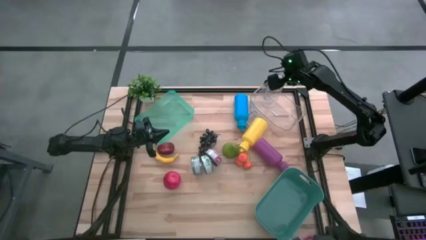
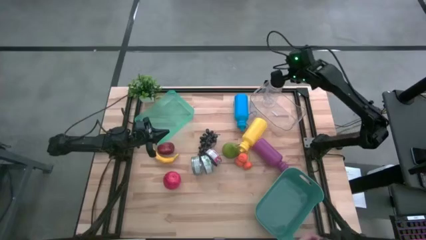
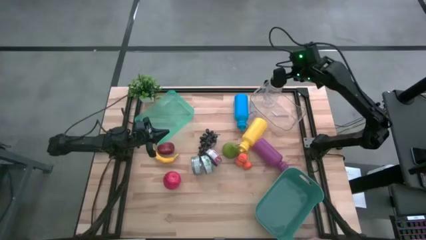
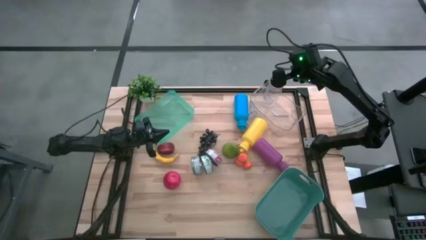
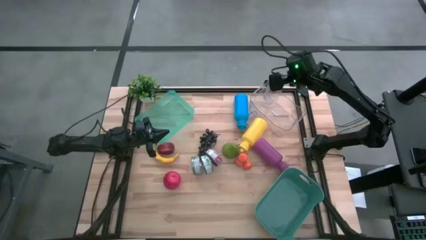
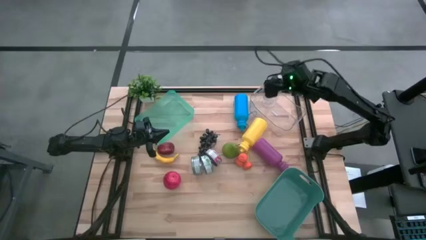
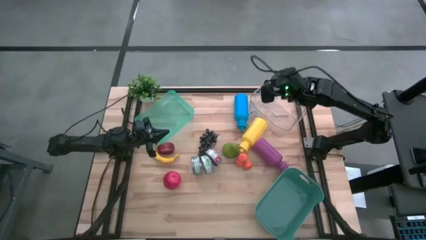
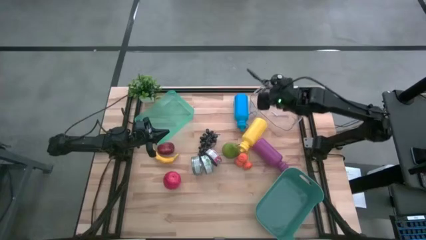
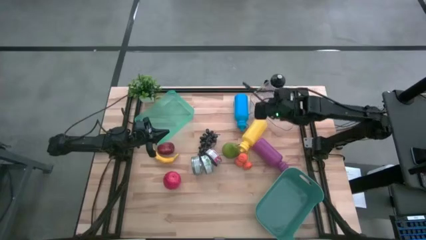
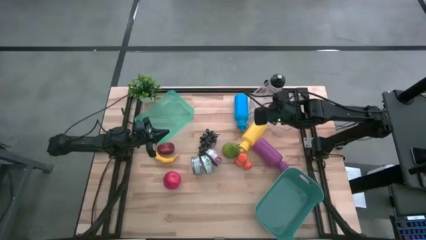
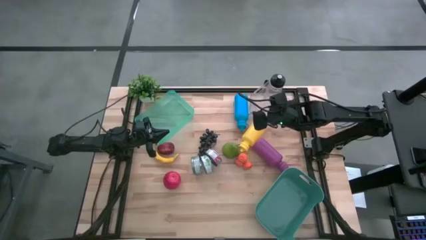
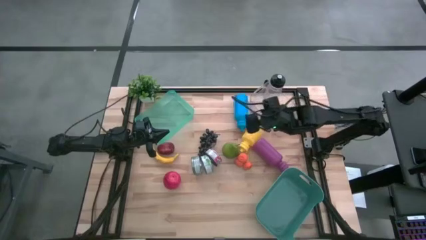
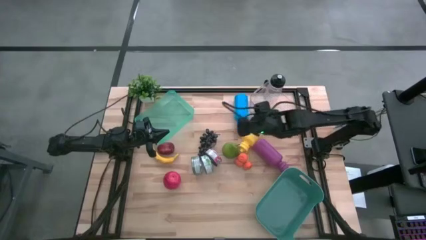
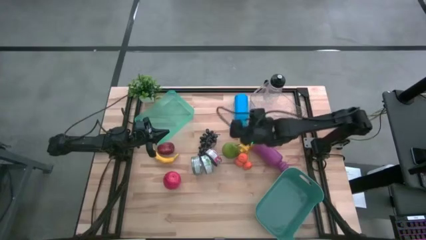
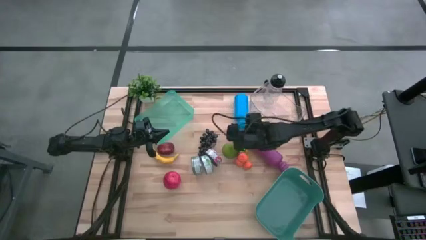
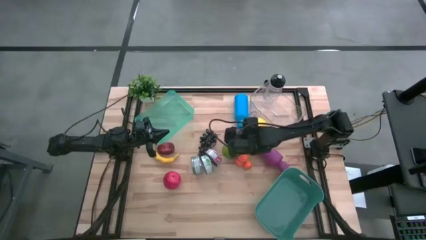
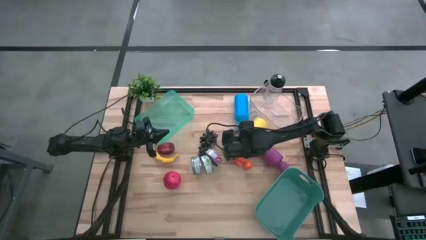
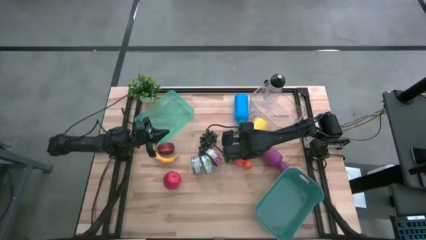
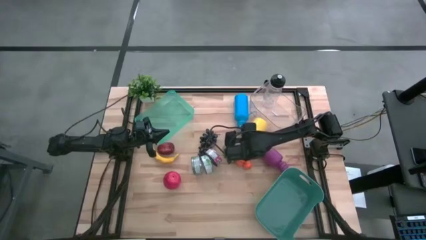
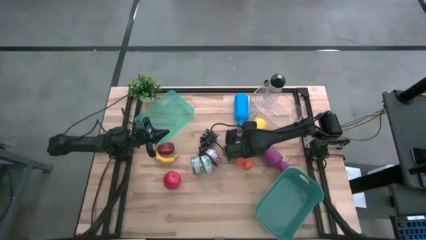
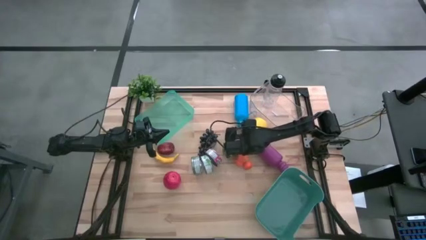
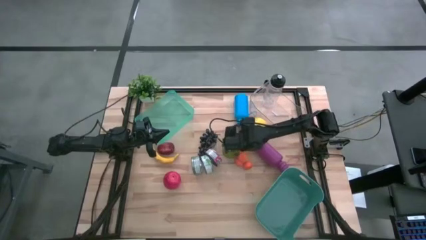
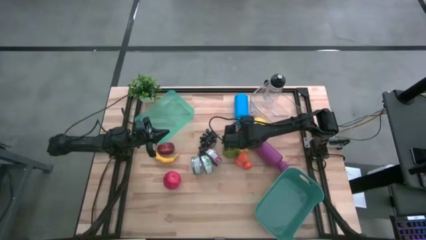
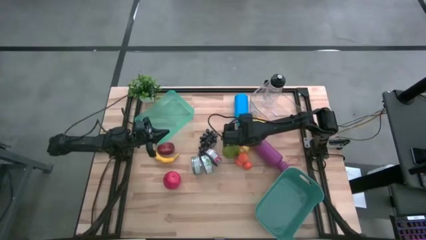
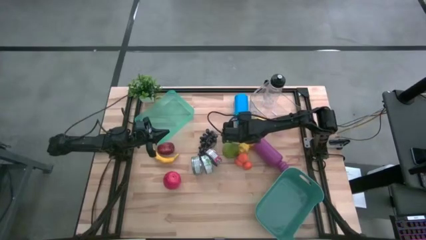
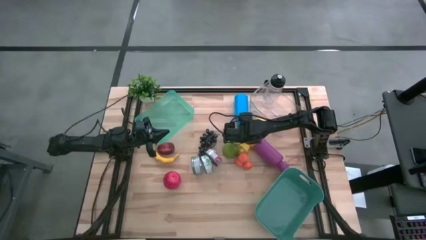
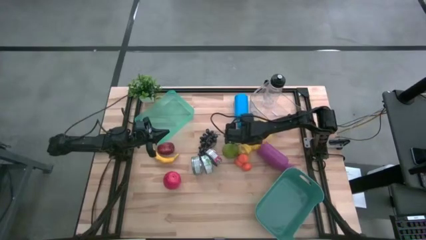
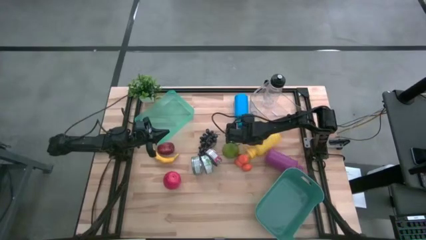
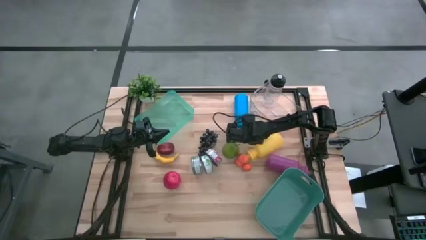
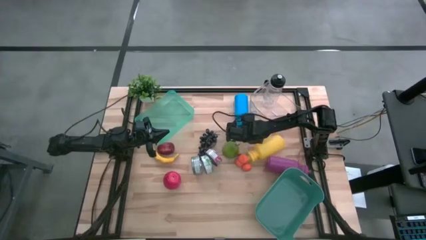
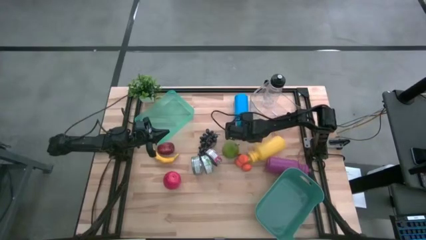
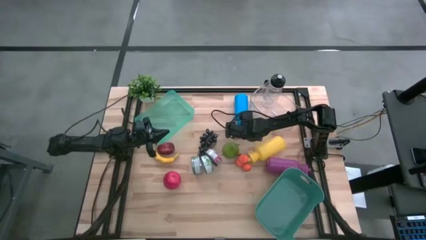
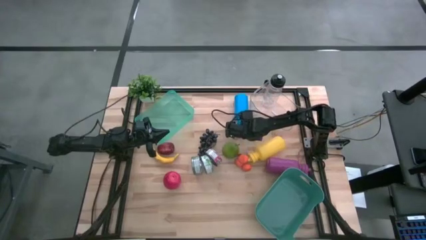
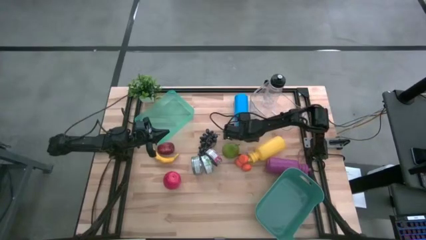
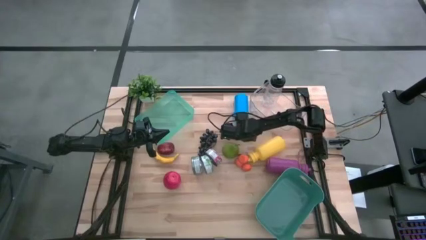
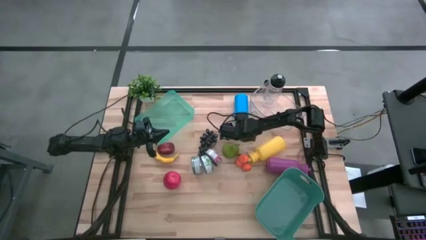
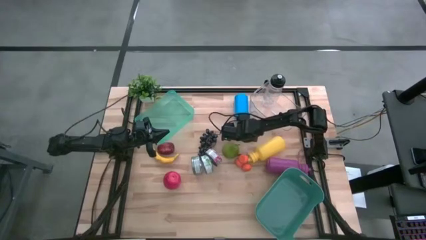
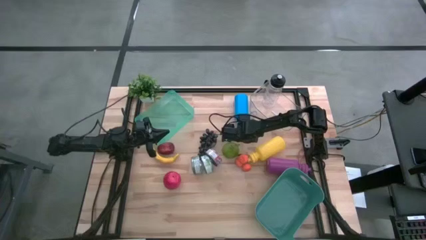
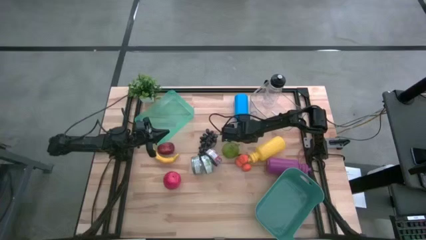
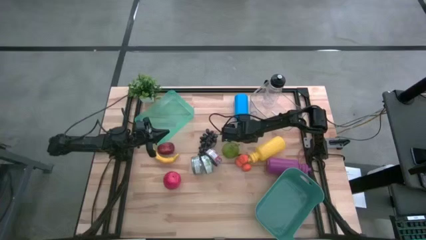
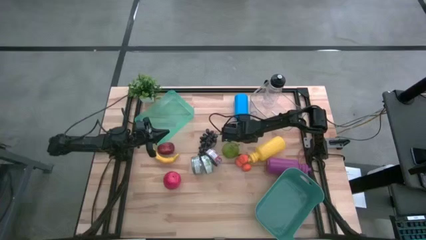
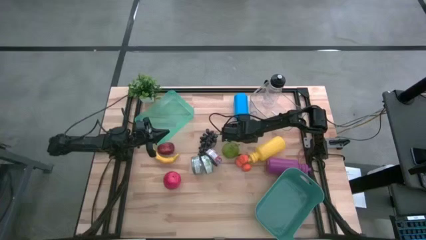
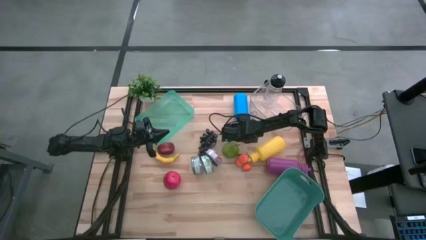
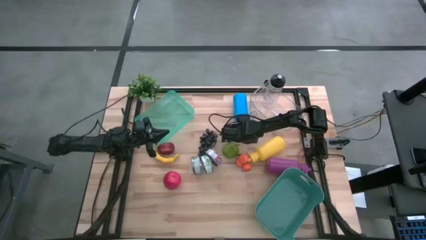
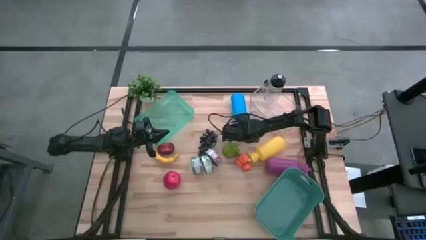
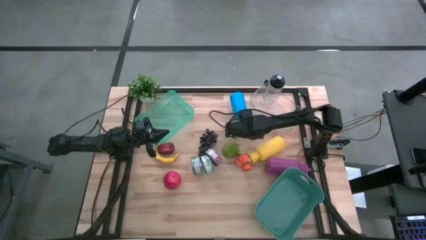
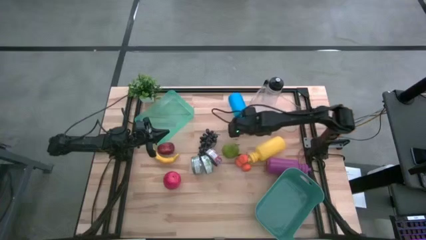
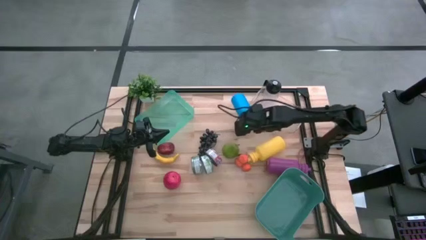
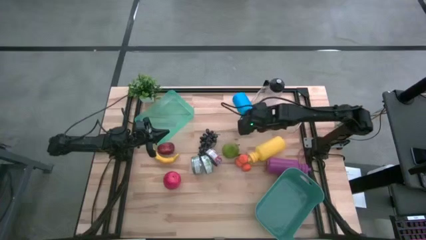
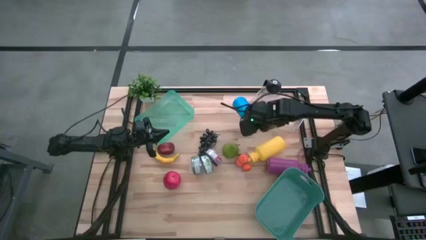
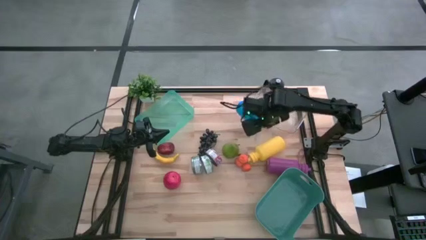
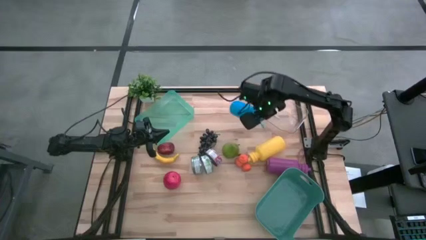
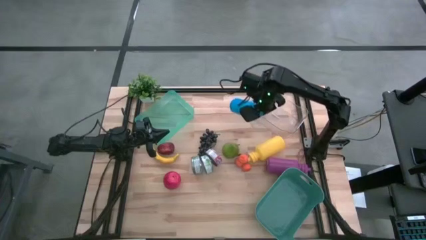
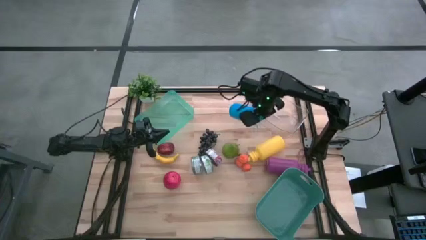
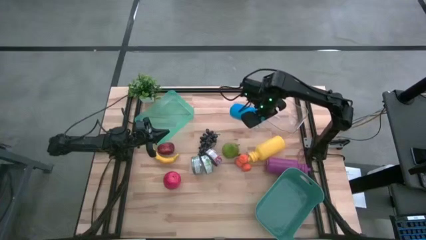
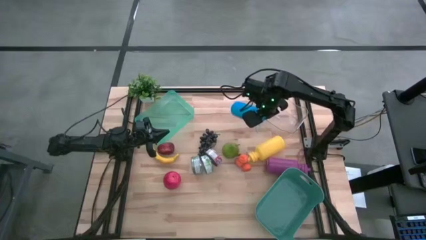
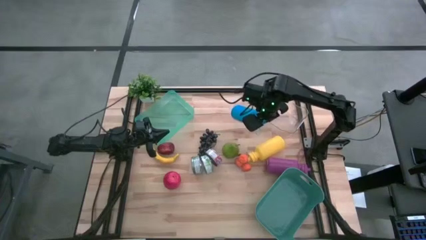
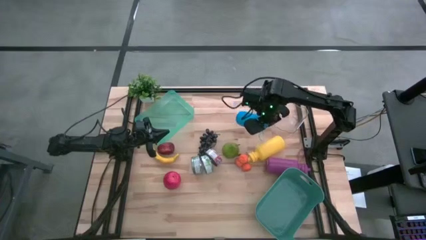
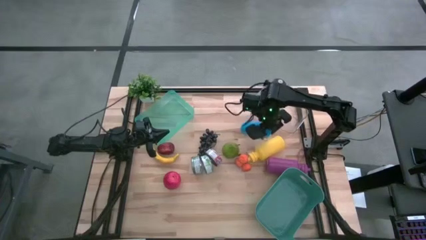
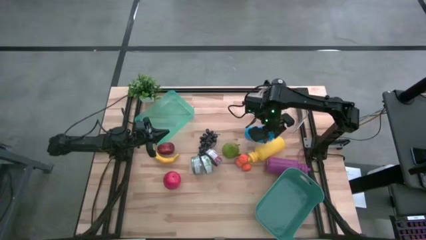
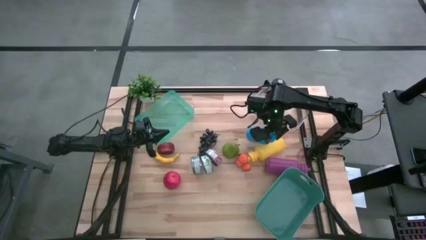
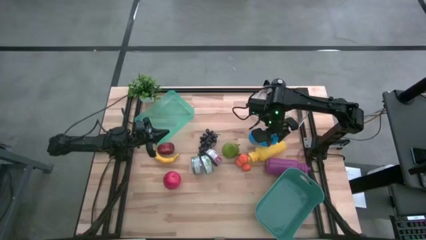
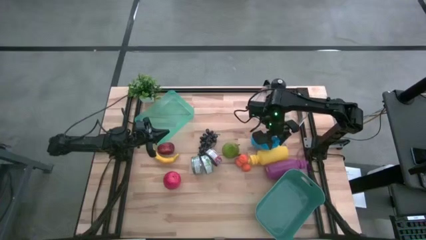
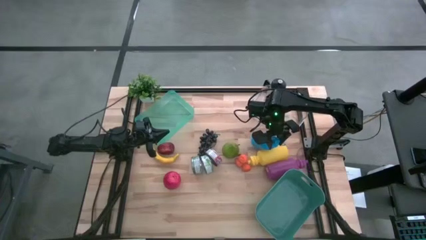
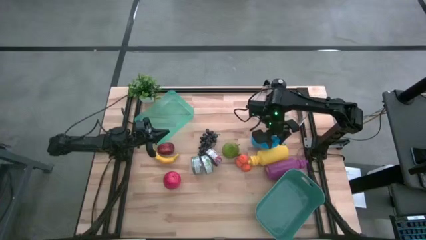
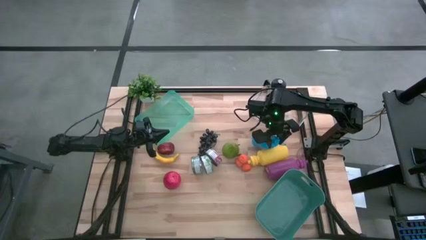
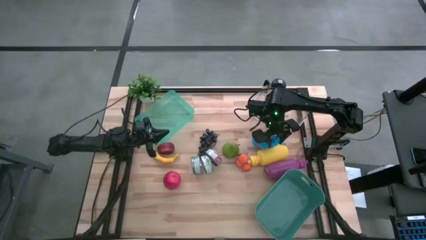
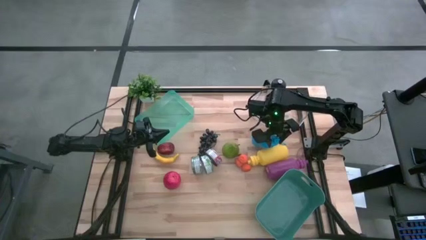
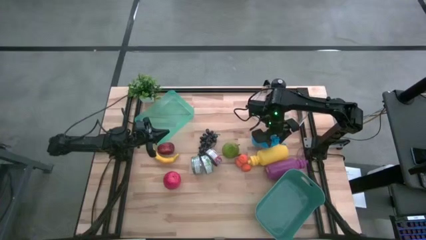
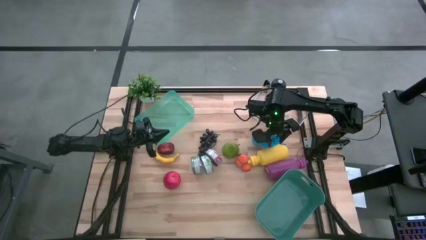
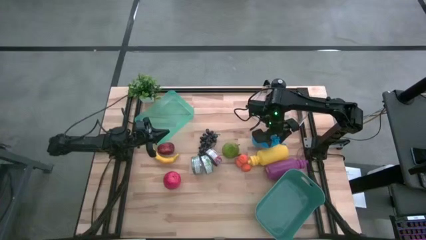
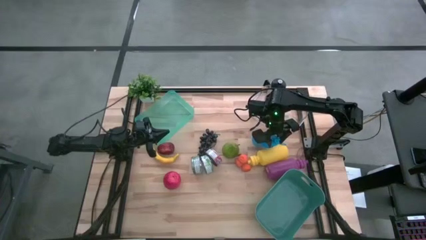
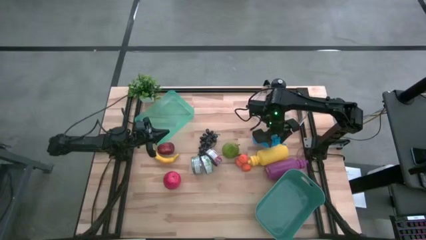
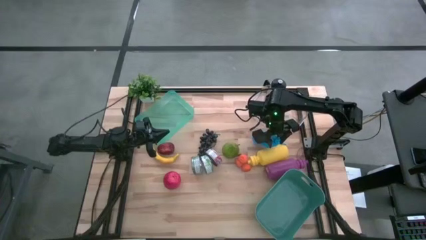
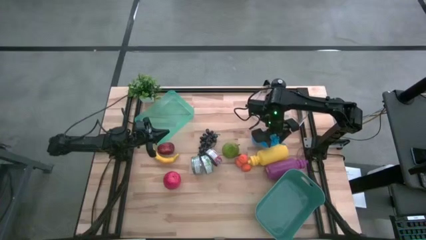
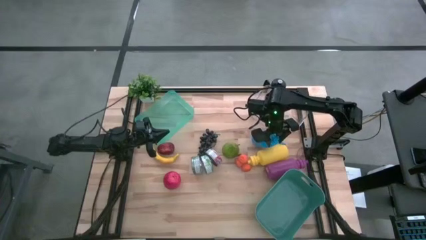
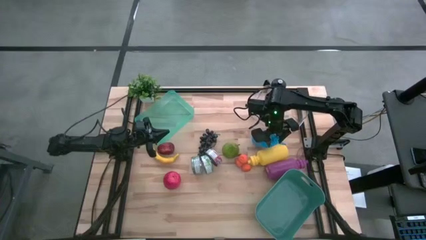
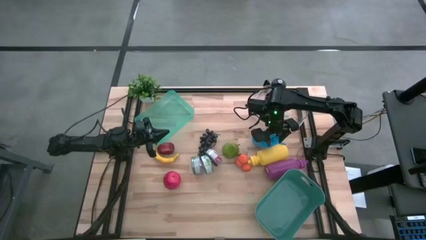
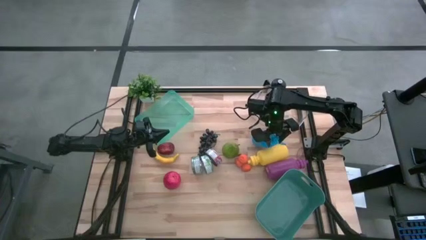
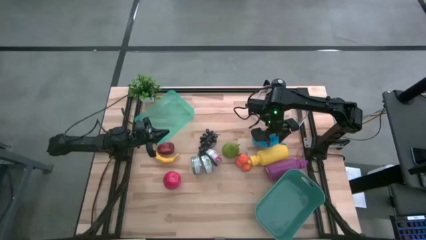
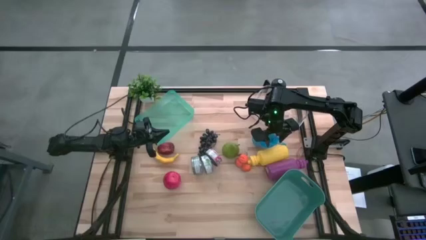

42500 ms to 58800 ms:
Task: Pick & Place Food Item
Put the blue water bottle into the transparent bin
